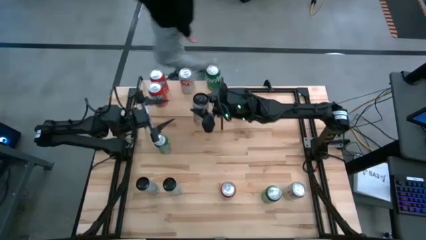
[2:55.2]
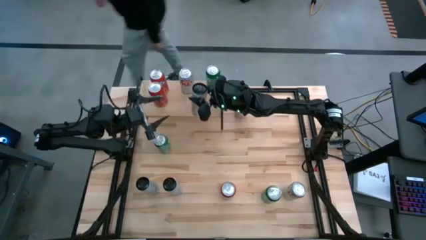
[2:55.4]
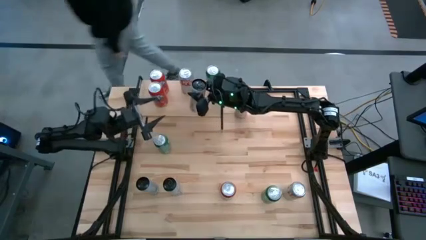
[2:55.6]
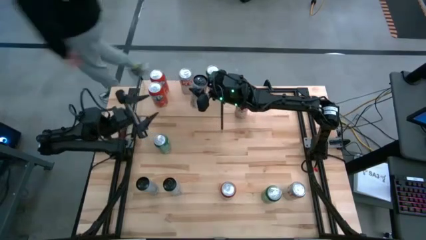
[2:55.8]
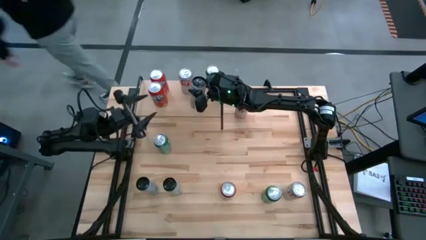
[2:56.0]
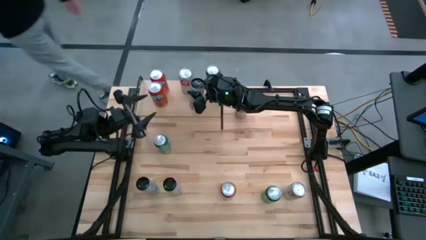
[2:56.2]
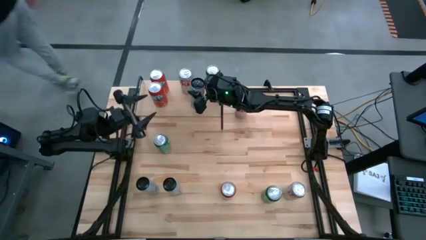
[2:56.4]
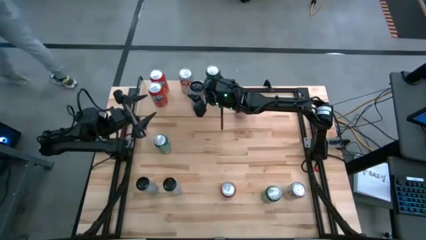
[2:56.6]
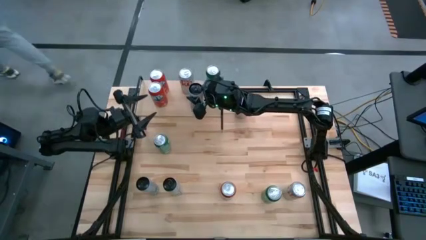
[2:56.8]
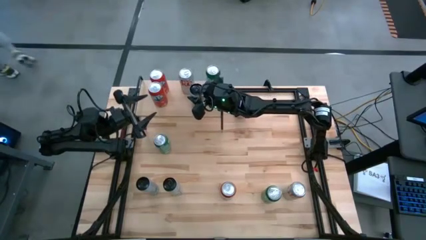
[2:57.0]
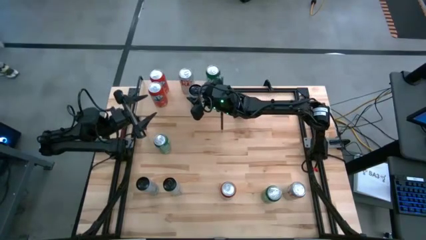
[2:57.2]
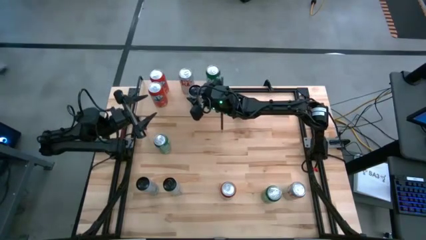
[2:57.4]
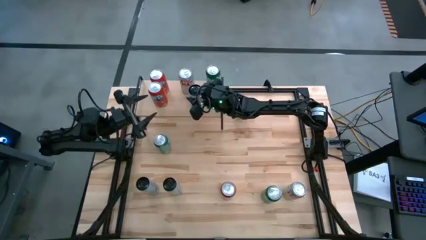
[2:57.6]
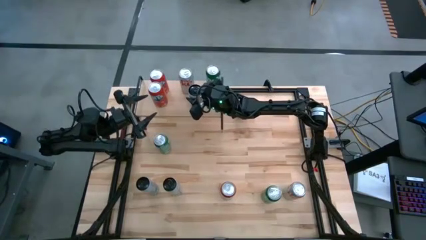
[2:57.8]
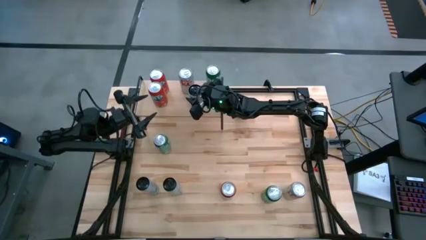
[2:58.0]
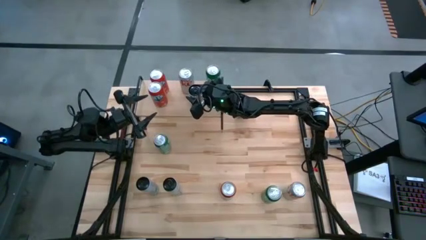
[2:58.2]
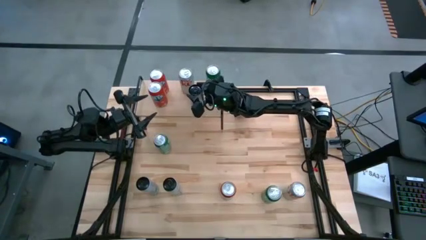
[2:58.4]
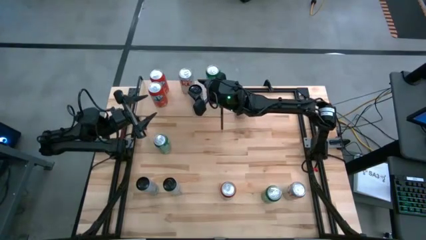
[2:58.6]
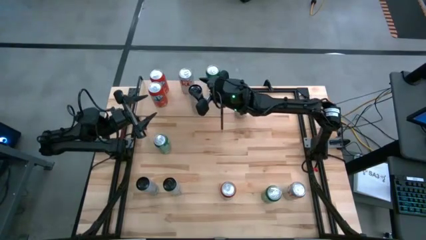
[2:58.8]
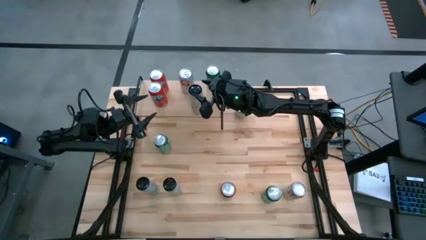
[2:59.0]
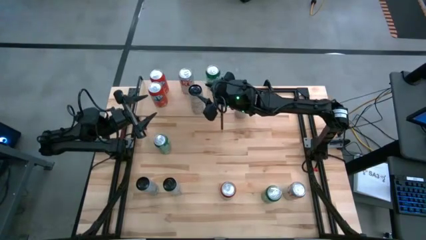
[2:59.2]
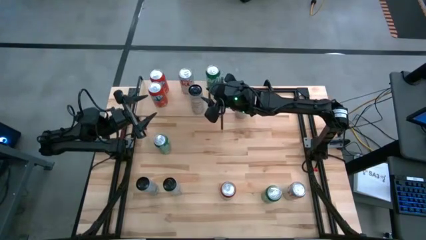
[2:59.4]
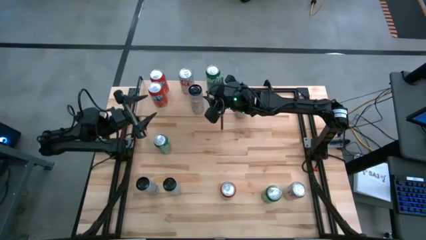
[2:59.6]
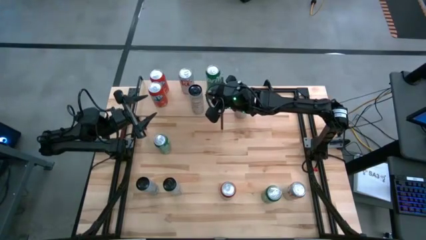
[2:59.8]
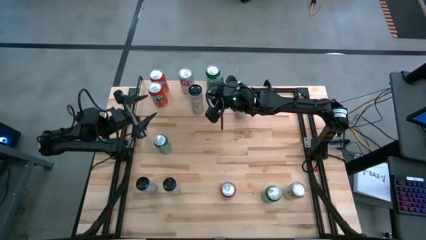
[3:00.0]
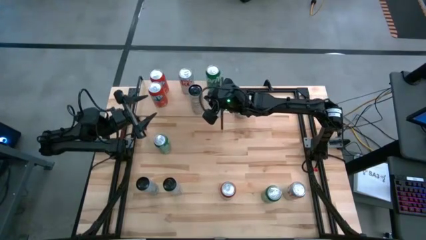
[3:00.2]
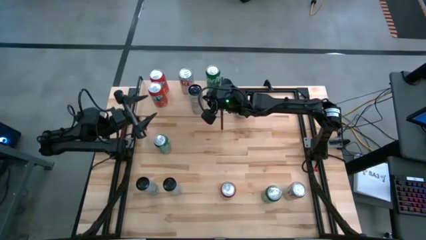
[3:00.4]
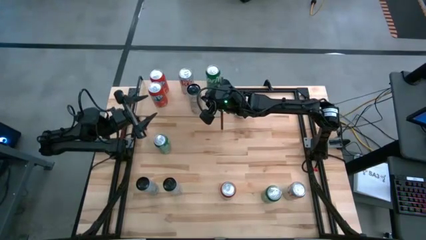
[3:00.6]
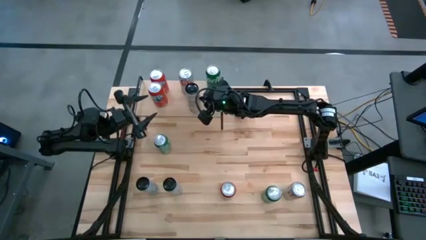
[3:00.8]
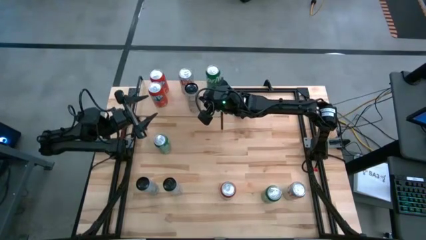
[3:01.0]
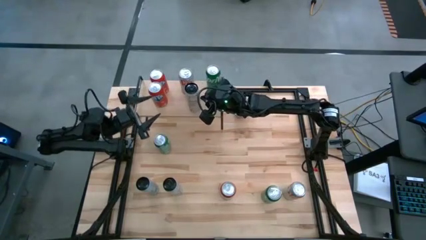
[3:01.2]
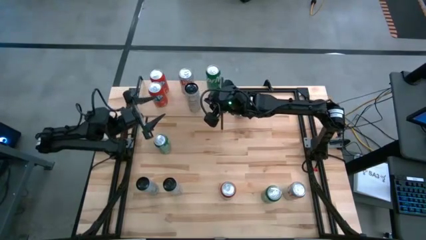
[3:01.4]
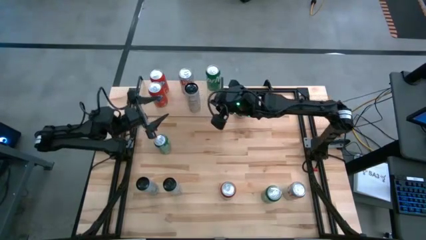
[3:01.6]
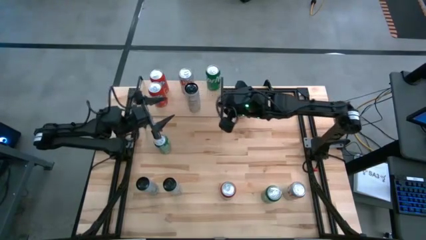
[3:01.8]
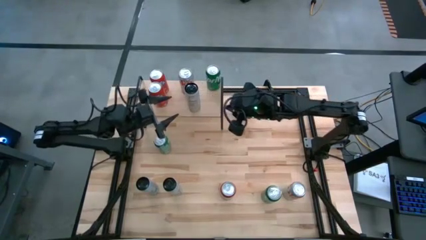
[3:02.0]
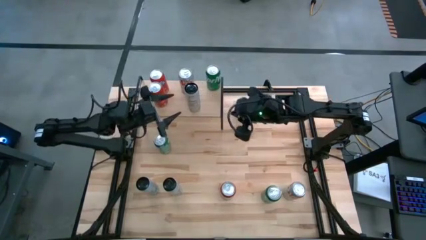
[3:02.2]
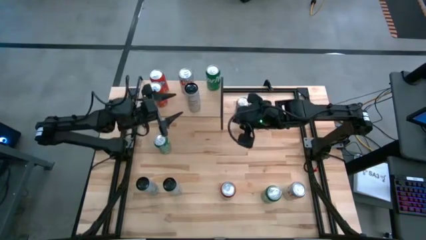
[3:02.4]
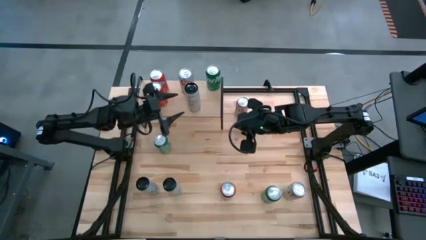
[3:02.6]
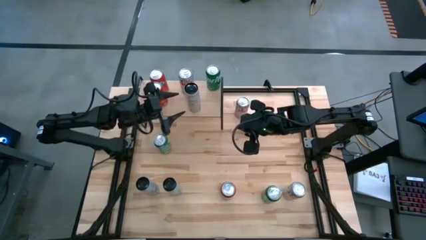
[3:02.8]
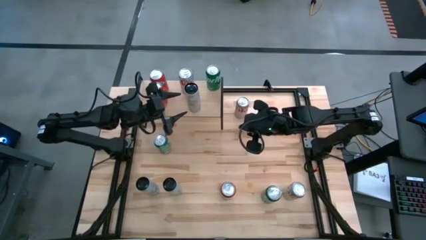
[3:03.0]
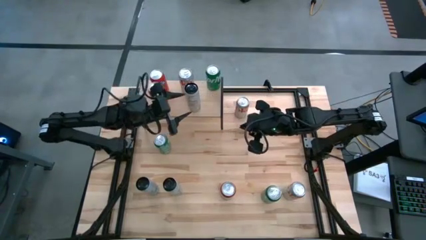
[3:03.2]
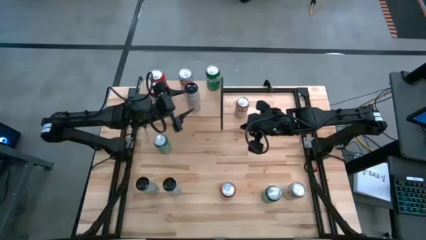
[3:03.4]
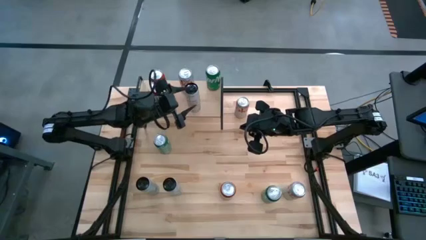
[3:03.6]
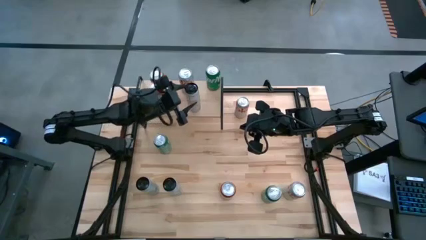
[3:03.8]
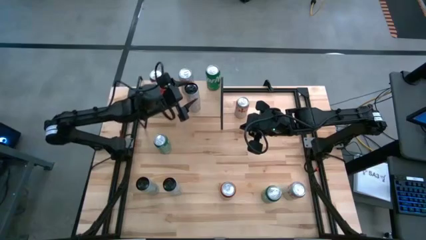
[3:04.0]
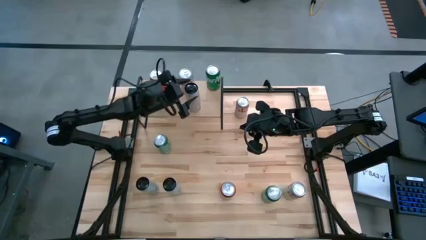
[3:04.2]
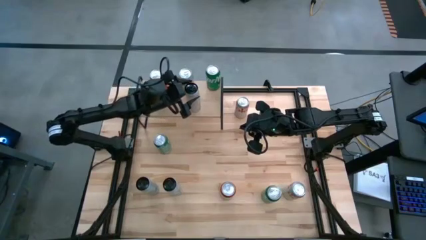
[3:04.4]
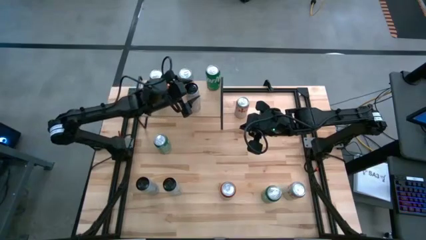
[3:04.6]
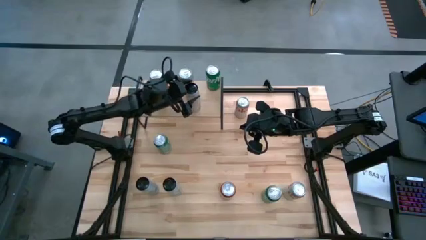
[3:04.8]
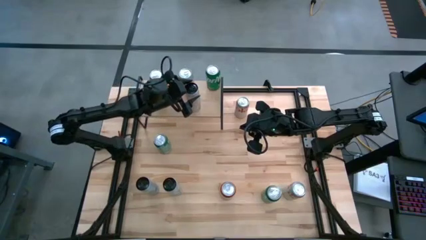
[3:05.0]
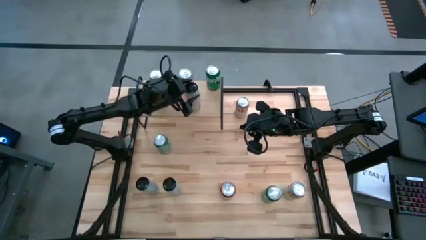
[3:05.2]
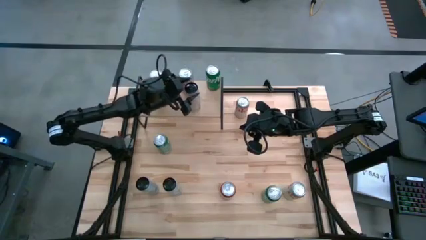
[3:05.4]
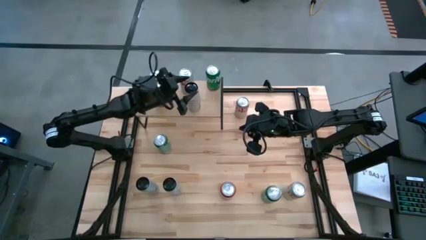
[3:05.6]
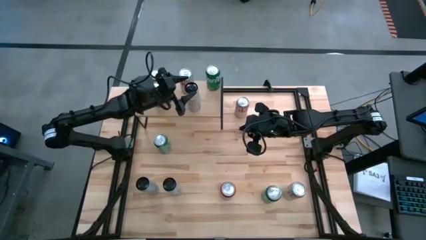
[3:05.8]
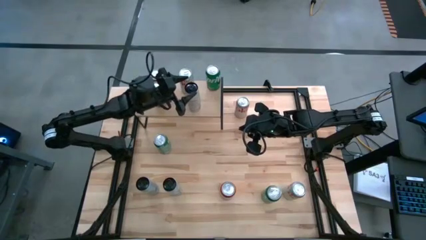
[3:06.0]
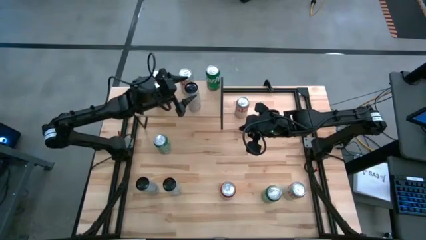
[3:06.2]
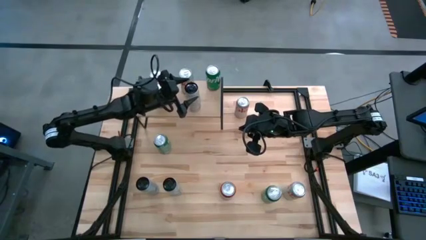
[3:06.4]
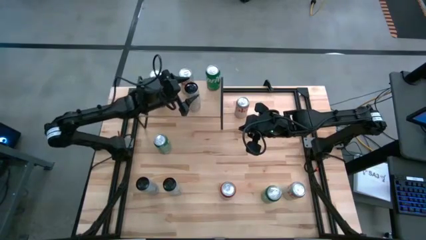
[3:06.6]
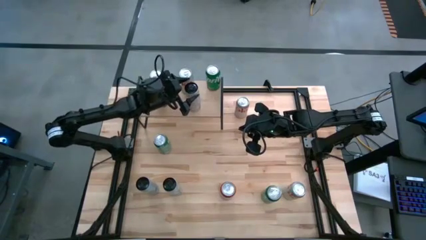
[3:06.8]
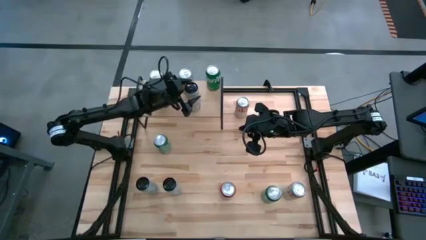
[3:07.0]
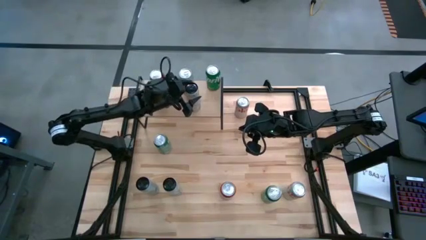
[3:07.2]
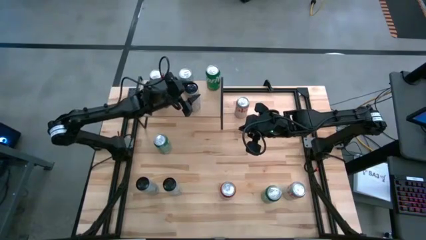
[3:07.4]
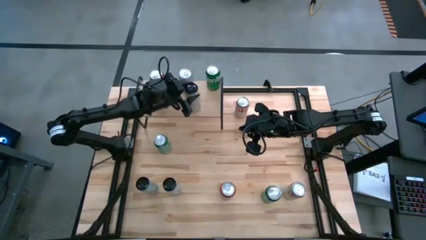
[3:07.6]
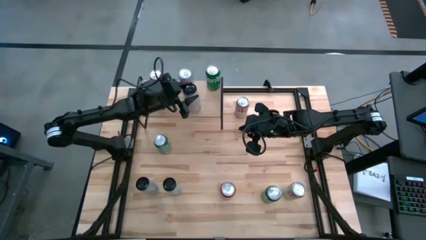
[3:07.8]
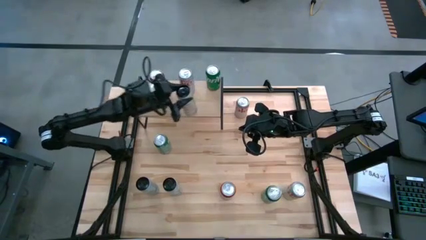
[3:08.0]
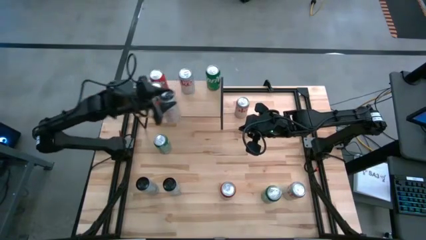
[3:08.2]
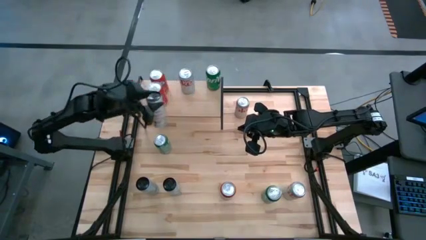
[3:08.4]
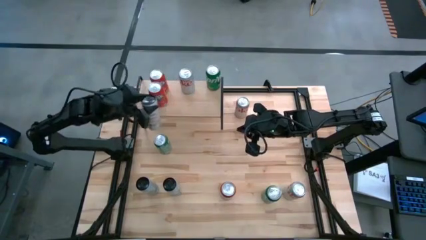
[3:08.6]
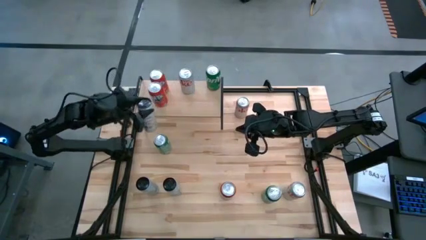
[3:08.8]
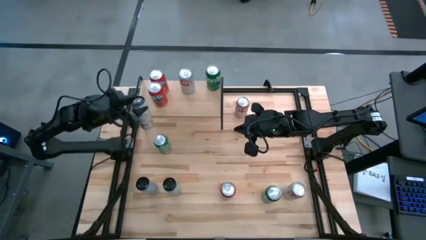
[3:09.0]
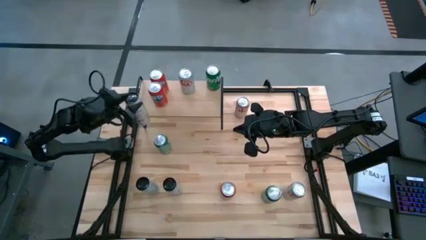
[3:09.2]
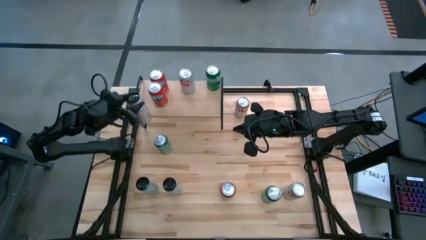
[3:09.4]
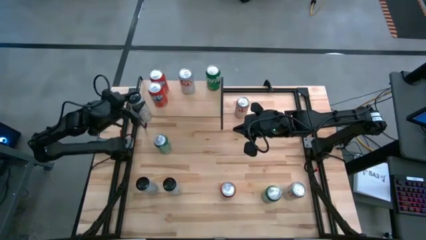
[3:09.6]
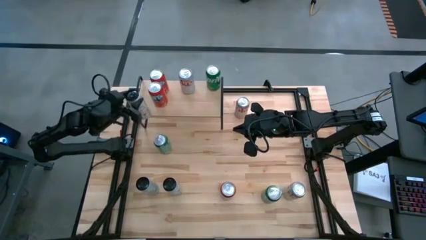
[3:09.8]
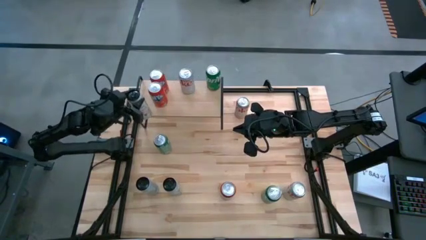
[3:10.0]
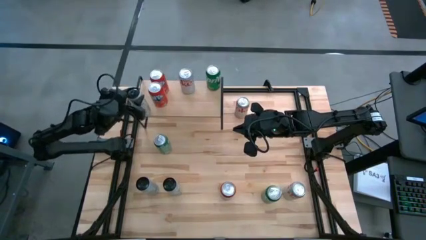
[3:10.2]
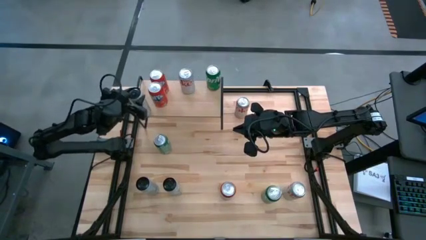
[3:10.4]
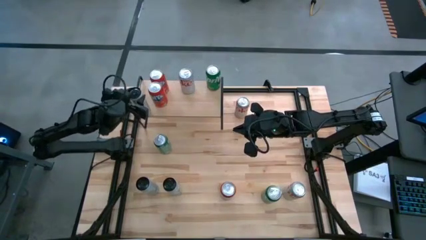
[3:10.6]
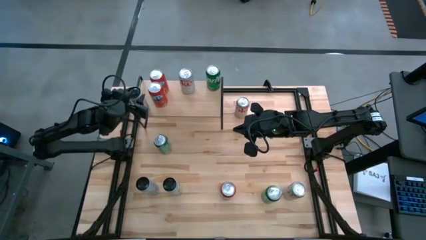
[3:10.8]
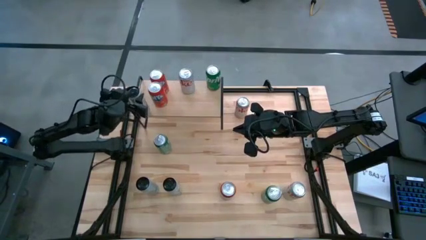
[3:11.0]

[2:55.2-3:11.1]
Task: Place canned beverage on shelf
Put the white and yellow soda can on the shelf
